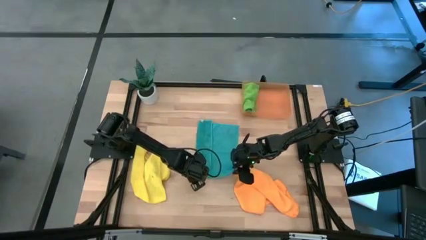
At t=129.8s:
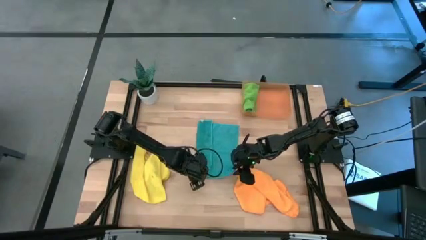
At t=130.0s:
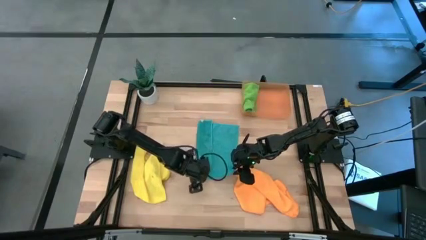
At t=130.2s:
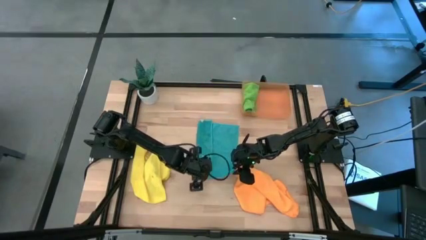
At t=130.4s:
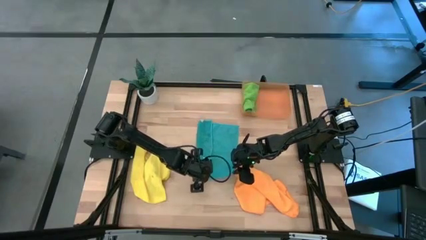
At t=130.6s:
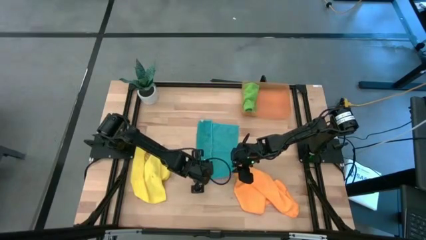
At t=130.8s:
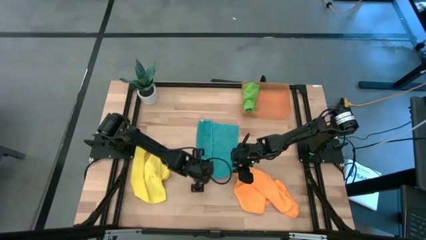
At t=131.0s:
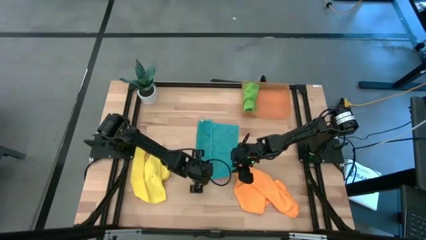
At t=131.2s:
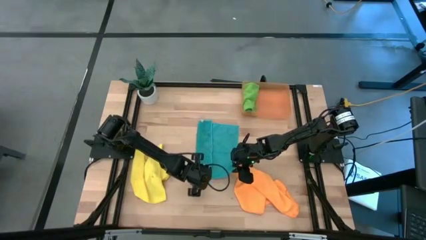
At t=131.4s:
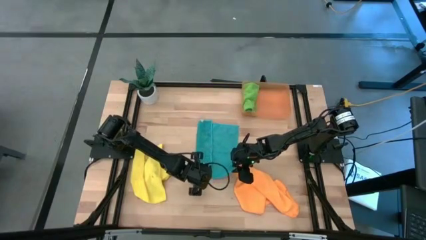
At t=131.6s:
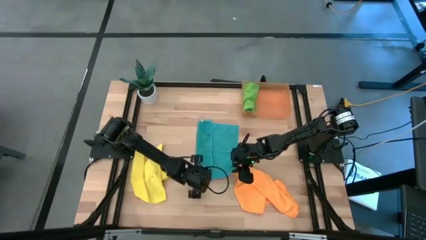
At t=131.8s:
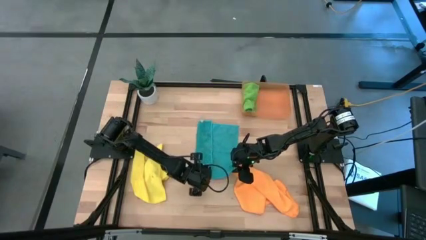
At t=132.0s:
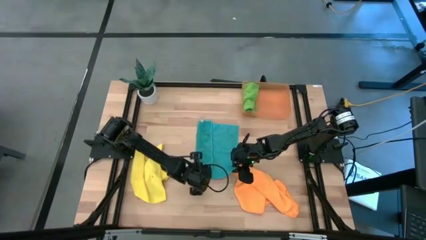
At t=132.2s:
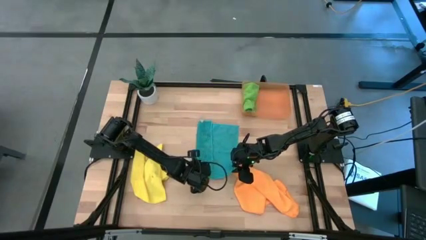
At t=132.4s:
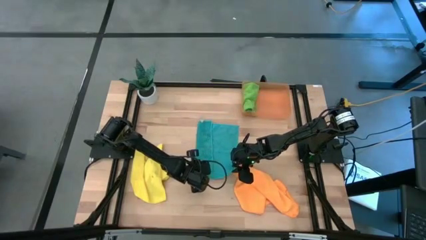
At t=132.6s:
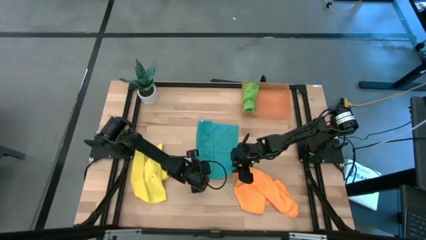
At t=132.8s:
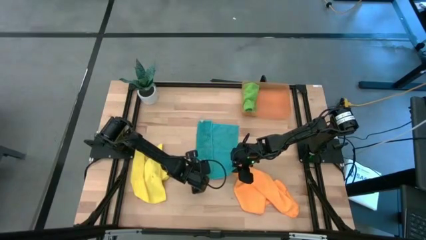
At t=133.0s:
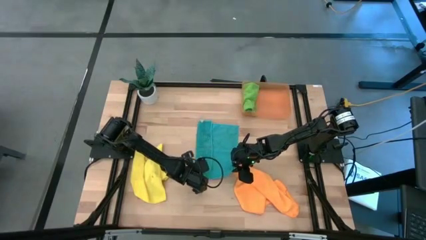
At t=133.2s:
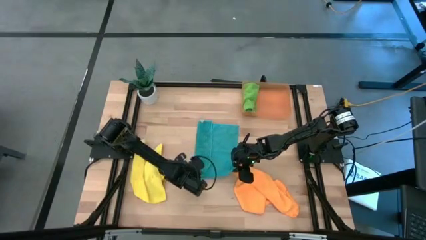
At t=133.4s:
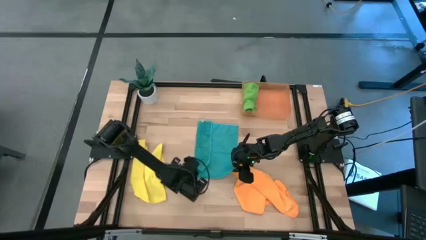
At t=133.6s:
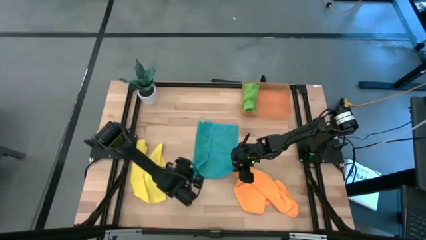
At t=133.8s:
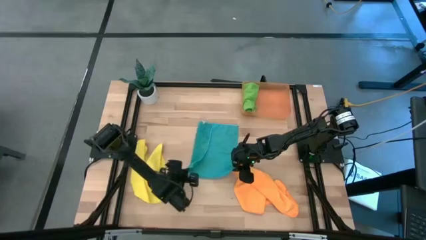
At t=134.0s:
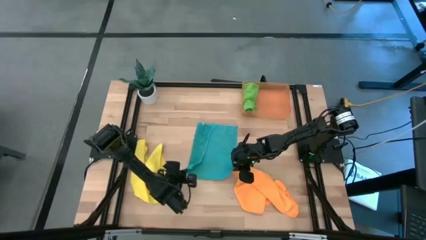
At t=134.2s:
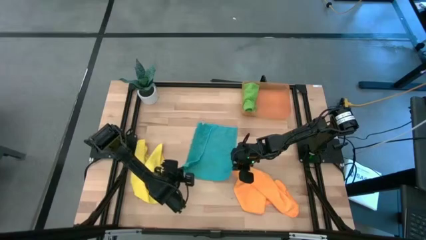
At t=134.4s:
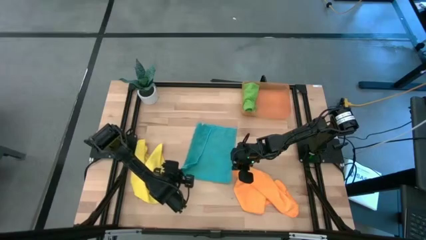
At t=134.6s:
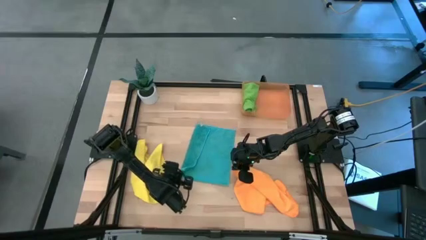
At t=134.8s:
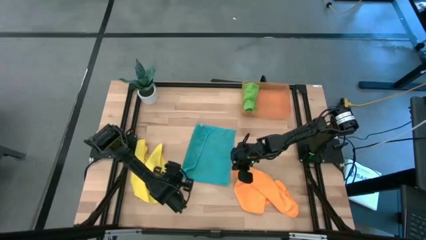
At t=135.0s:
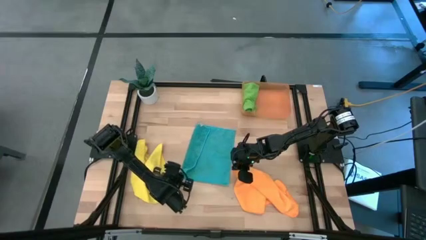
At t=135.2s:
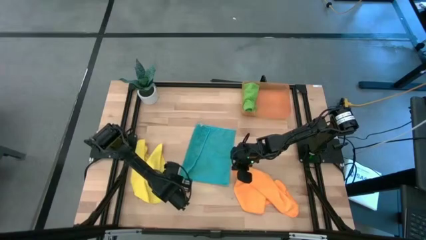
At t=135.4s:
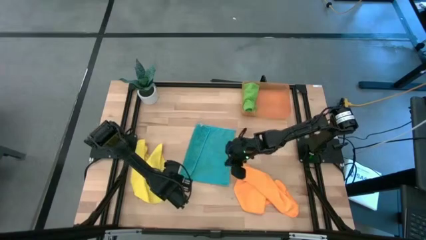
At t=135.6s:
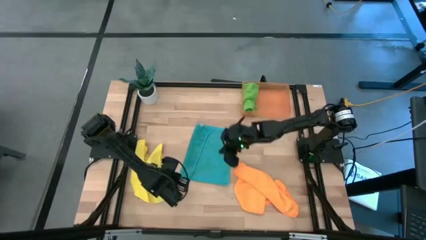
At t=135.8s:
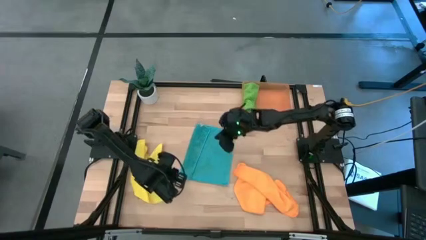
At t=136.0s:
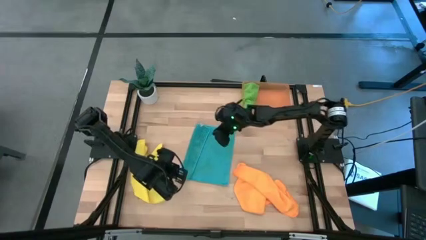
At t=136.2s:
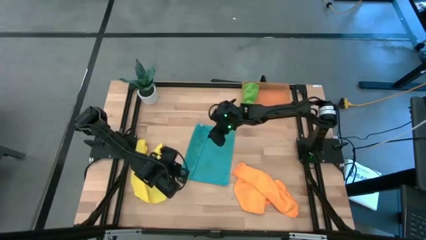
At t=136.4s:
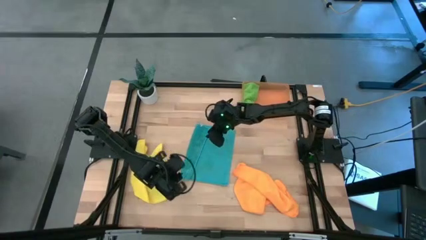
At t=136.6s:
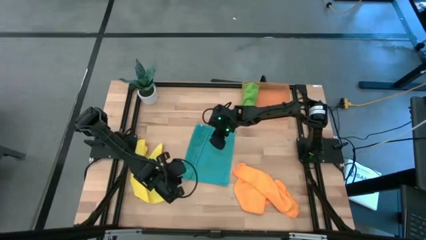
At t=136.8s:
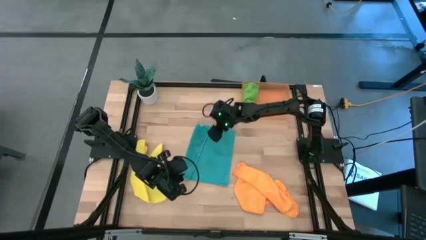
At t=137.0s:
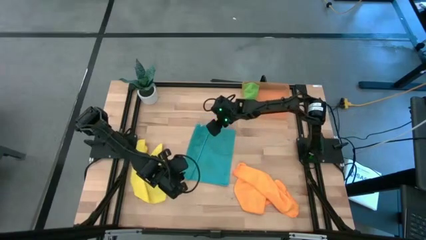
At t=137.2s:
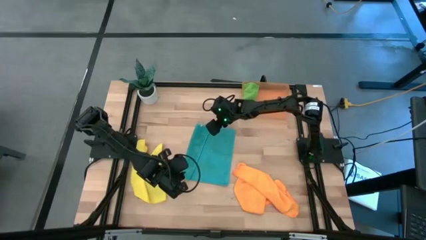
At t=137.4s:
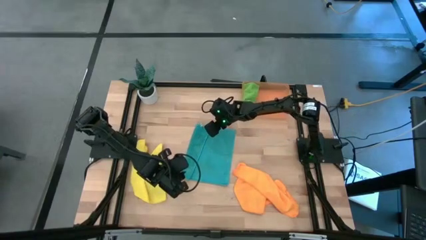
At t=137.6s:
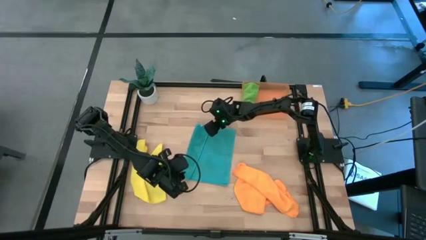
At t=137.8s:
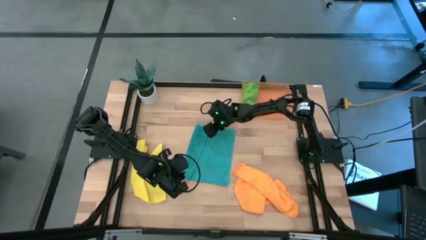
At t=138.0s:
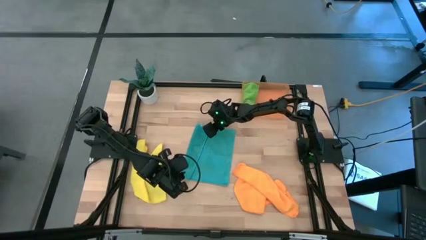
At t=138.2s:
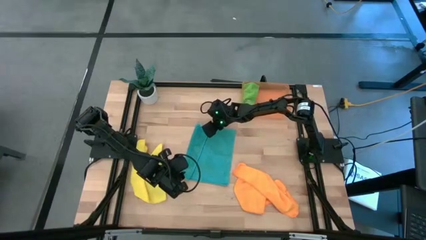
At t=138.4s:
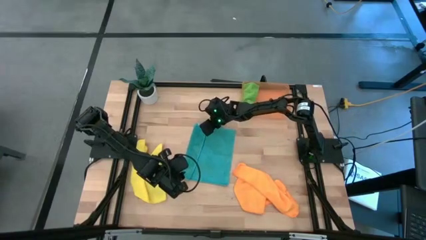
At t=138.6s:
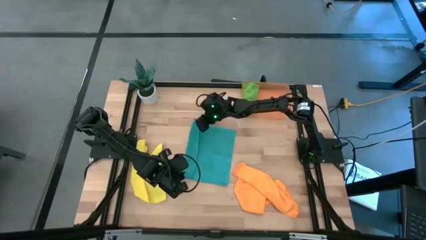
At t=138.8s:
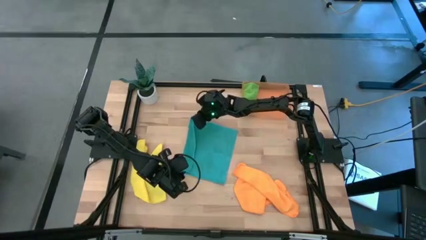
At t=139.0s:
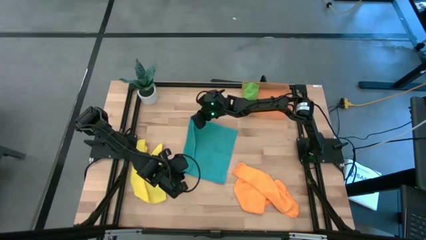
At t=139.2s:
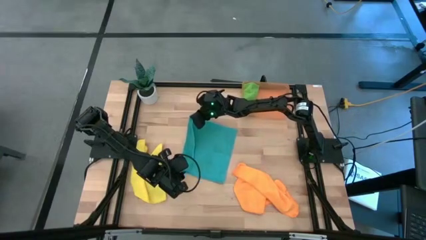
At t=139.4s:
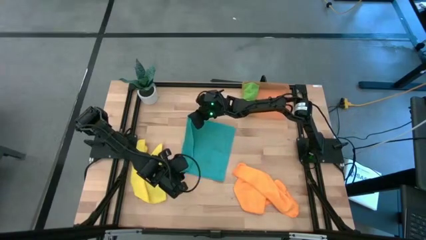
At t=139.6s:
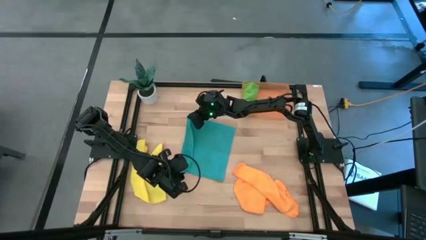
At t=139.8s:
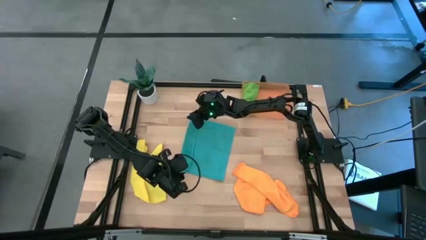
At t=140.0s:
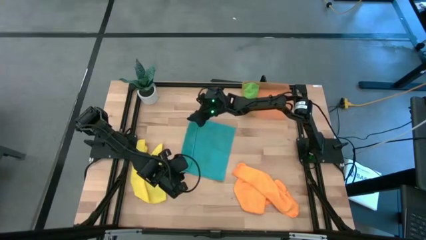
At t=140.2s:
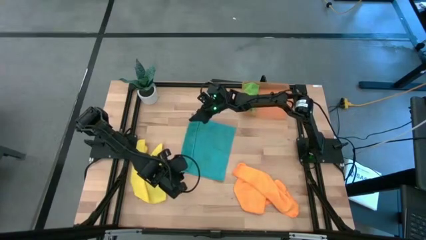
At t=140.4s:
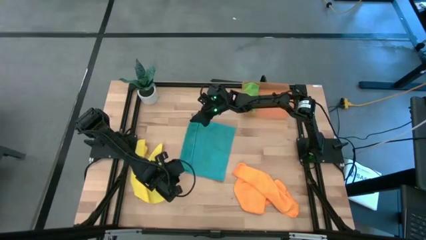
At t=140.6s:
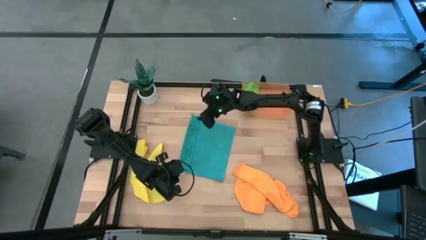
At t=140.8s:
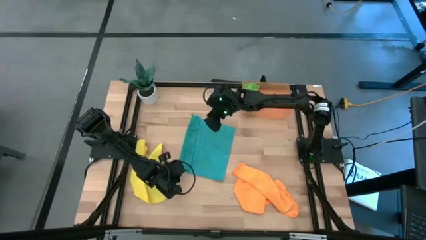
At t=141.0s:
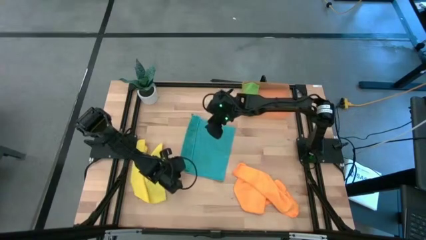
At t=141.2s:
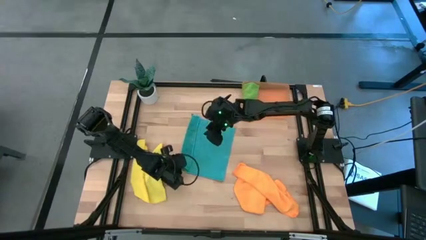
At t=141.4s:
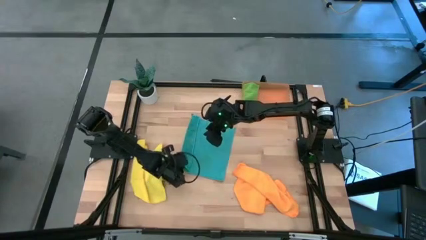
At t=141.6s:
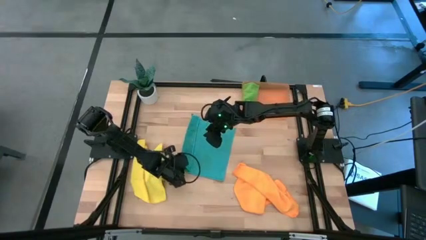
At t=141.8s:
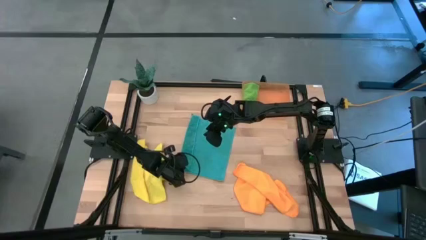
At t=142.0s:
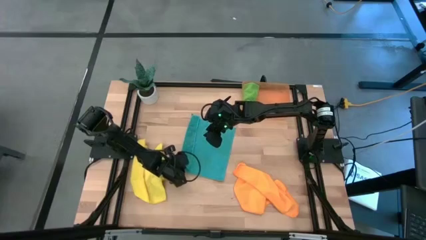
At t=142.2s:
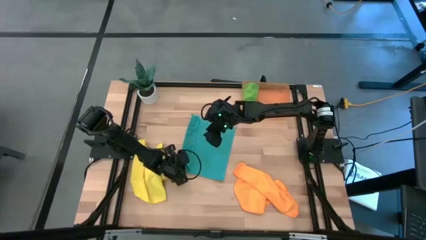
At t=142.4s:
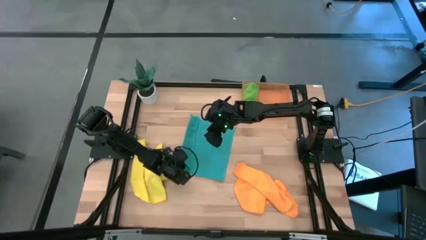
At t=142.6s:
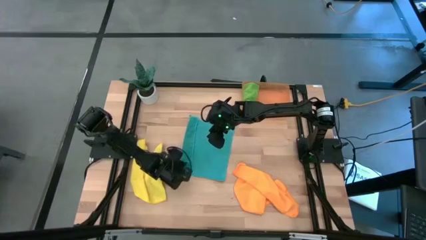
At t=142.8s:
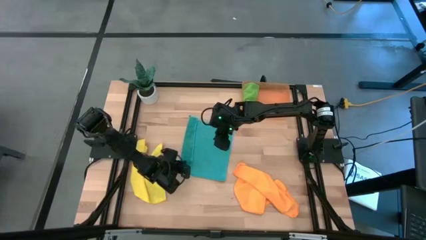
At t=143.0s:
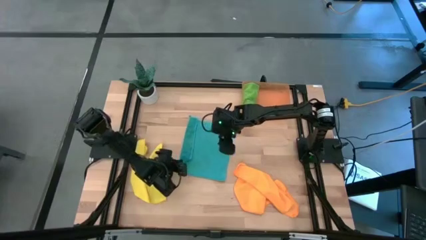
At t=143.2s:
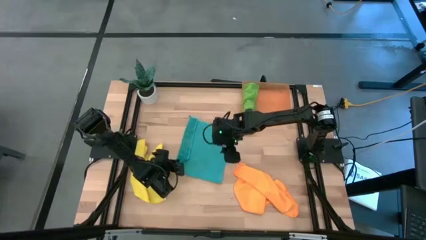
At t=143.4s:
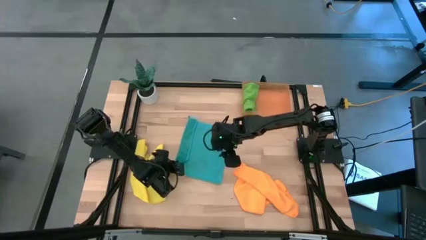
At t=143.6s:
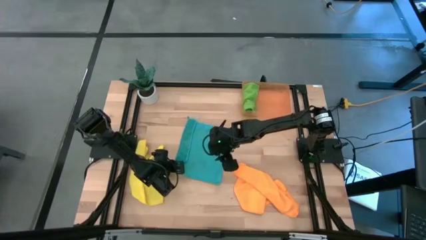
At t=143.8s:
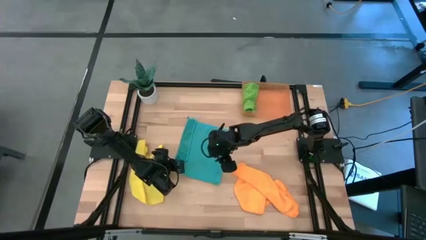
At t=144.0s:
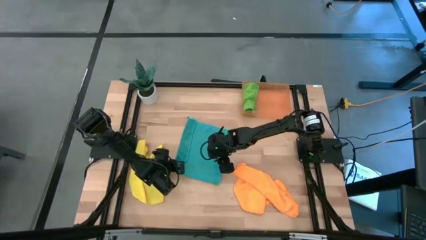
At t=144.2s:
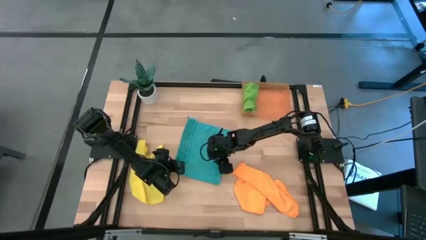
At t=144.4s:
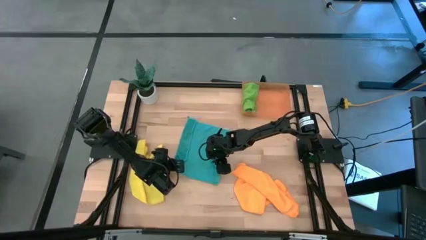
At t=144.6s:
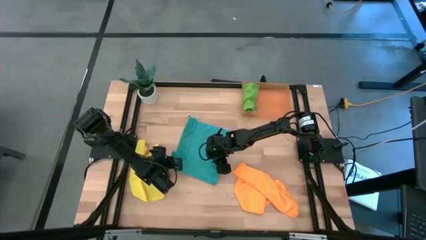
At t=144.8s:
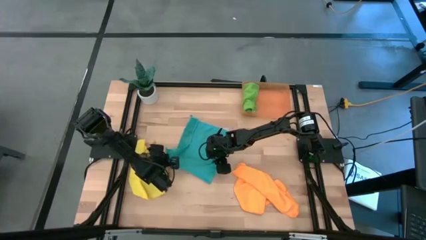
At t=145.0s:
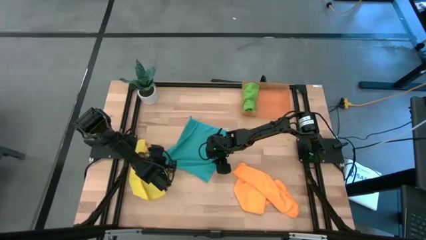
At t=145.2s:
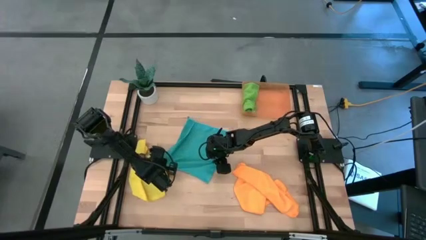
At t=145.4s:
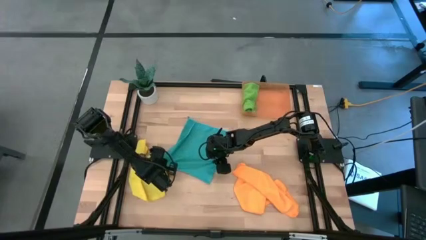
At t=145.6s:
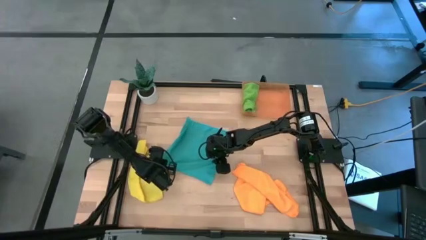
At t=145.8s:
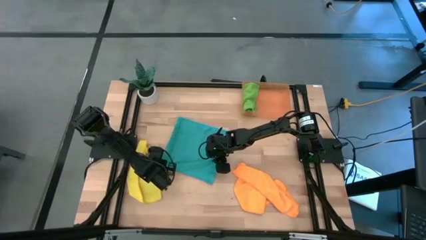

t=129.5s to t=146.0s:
Task: Roll microfiber towels into tight, uniform cylinder then place into a basket
Fold the blue towel
